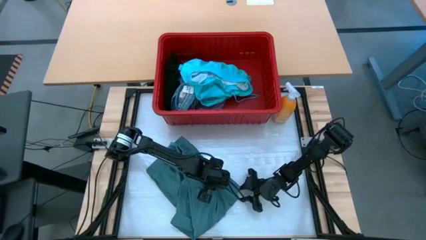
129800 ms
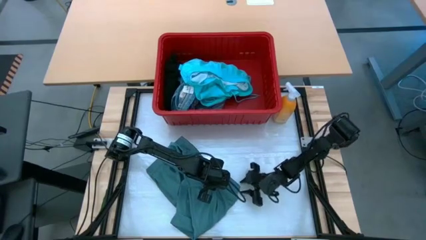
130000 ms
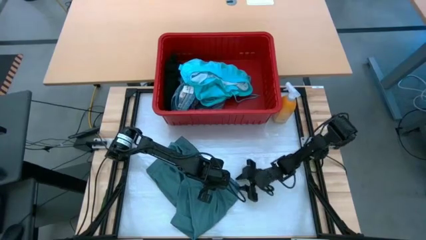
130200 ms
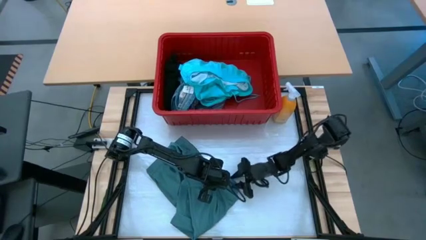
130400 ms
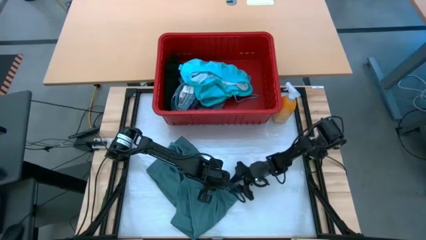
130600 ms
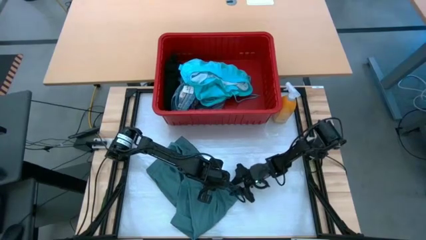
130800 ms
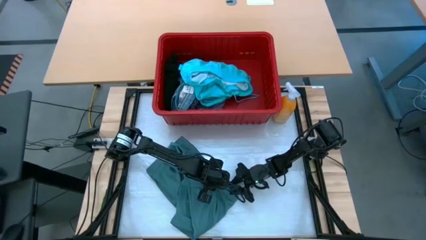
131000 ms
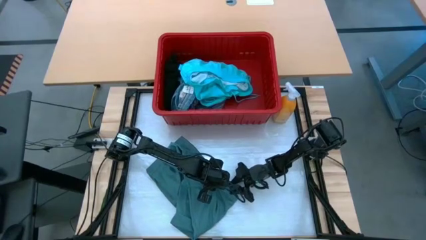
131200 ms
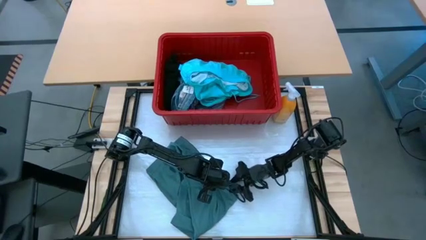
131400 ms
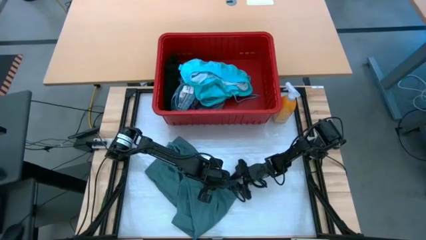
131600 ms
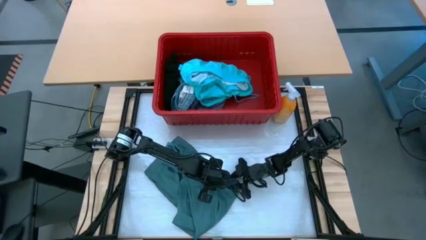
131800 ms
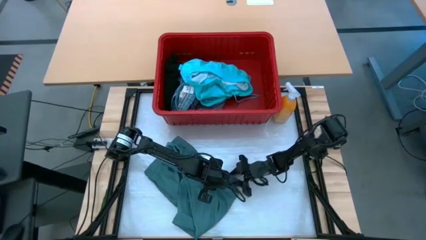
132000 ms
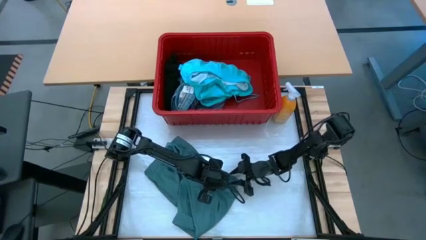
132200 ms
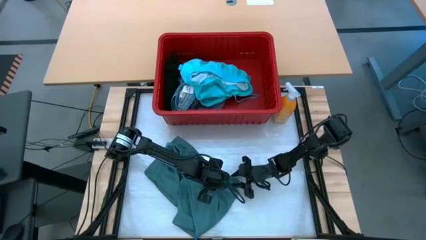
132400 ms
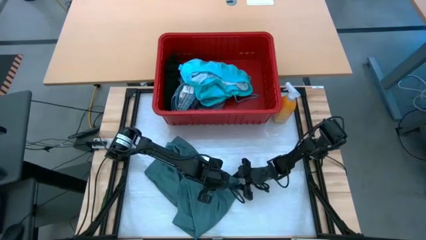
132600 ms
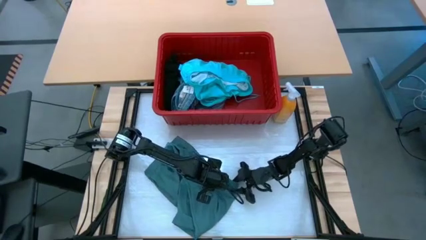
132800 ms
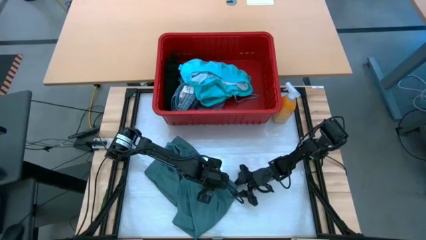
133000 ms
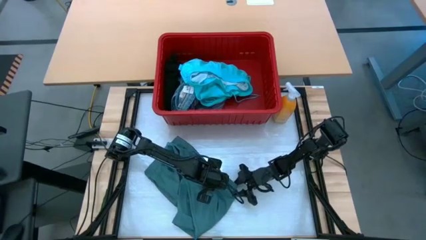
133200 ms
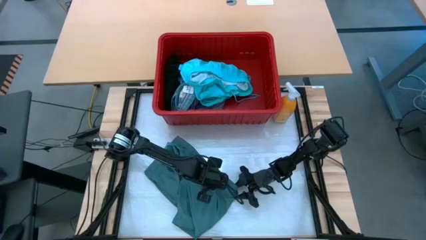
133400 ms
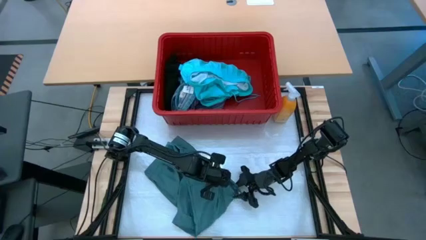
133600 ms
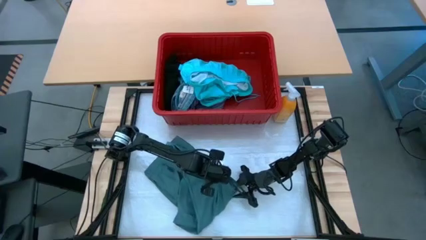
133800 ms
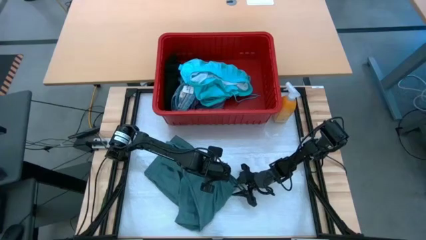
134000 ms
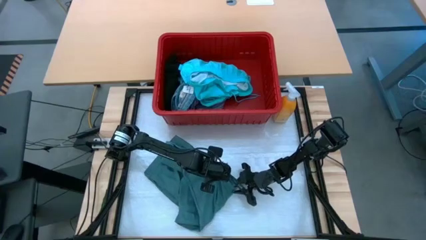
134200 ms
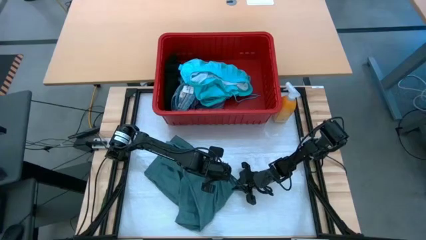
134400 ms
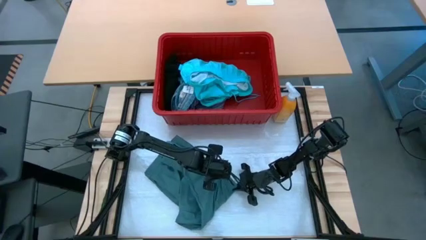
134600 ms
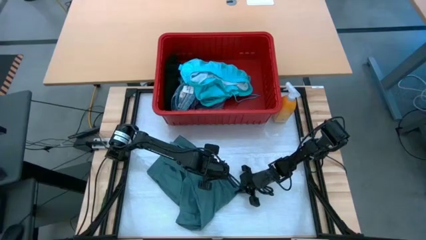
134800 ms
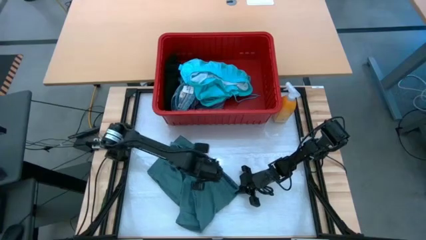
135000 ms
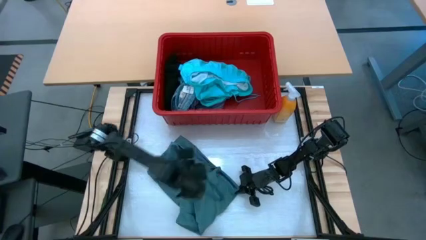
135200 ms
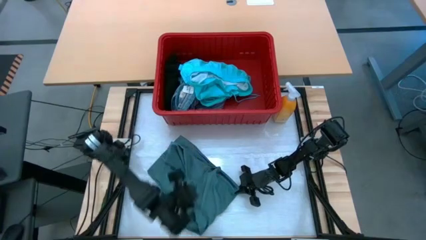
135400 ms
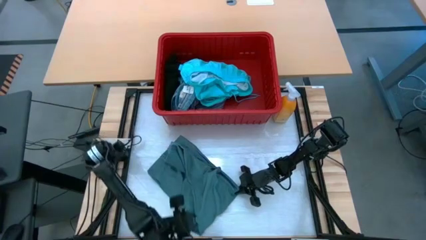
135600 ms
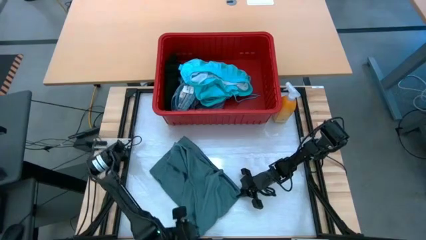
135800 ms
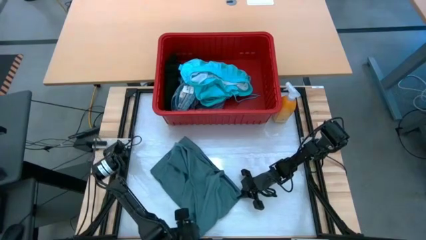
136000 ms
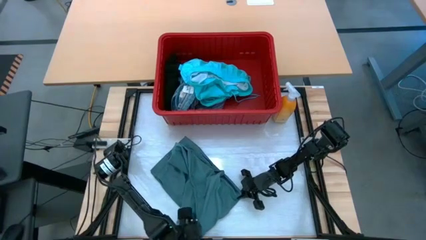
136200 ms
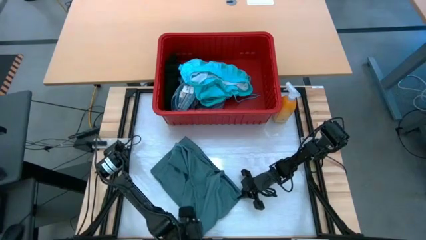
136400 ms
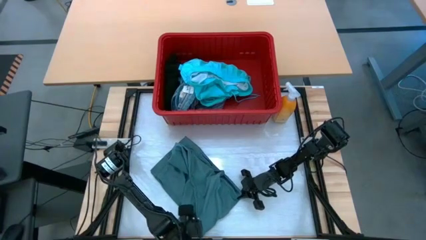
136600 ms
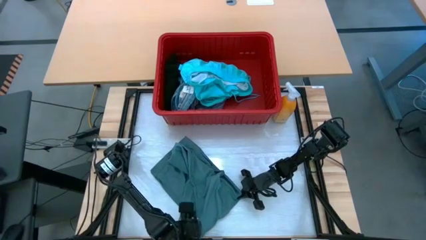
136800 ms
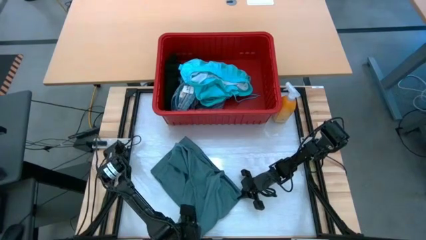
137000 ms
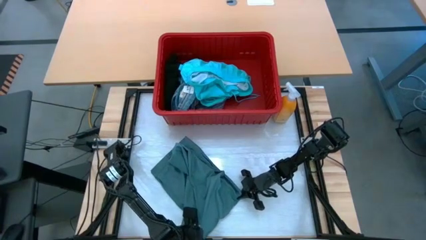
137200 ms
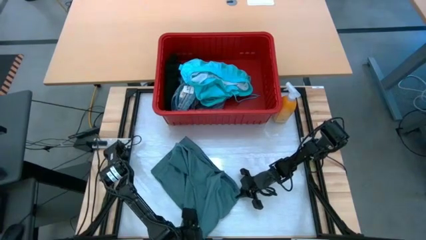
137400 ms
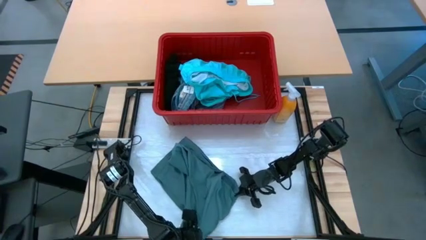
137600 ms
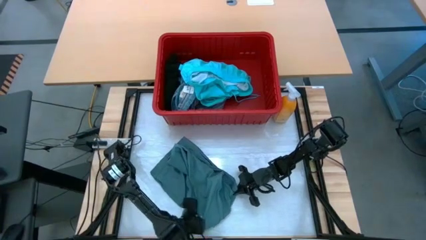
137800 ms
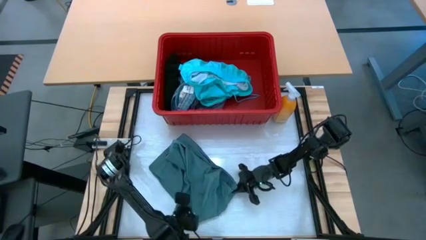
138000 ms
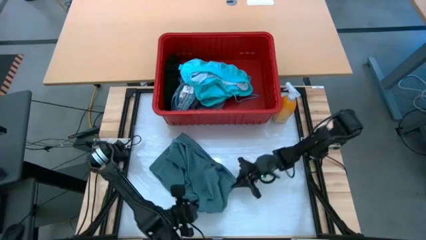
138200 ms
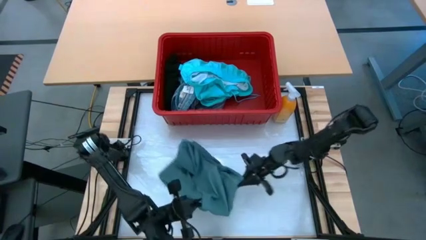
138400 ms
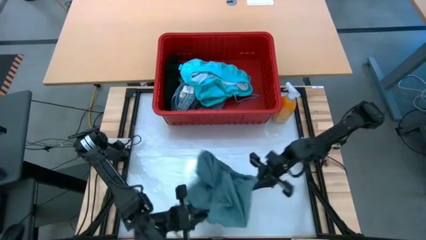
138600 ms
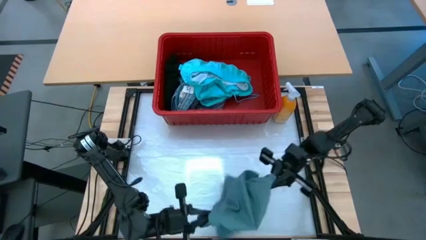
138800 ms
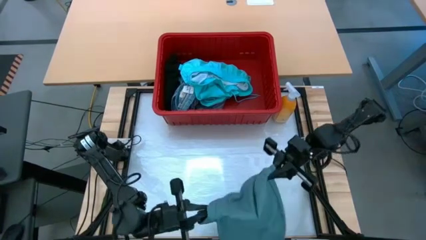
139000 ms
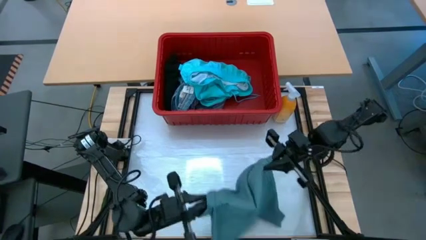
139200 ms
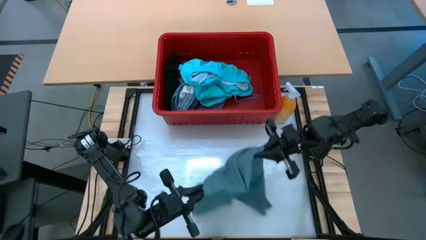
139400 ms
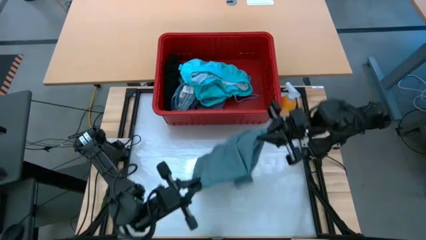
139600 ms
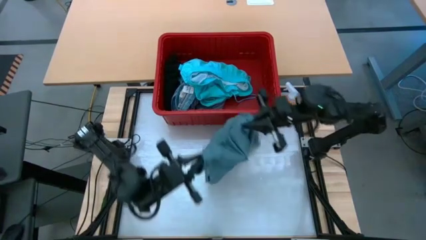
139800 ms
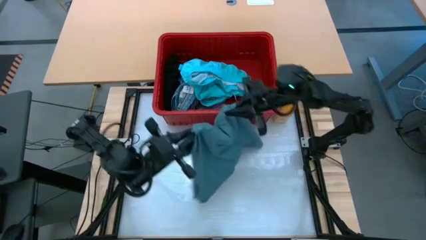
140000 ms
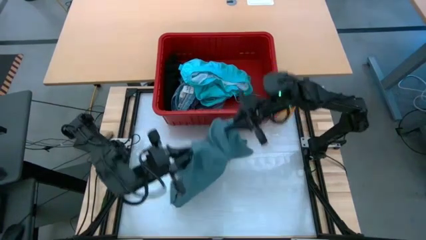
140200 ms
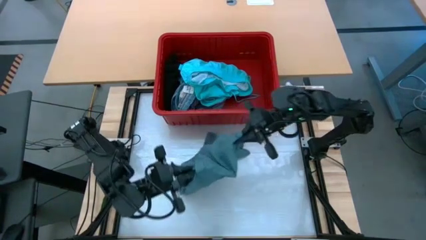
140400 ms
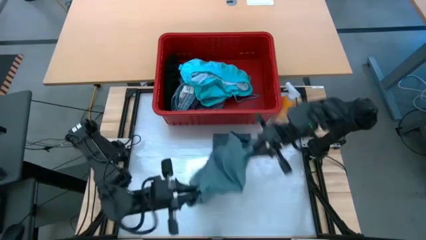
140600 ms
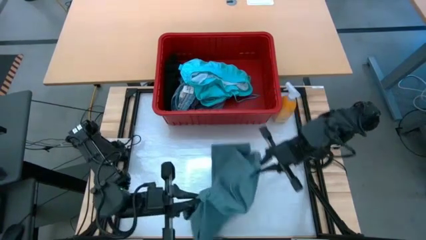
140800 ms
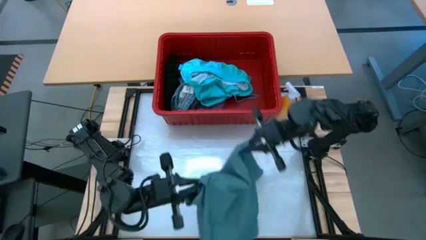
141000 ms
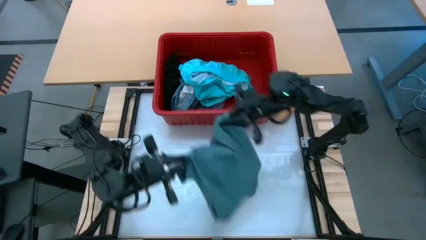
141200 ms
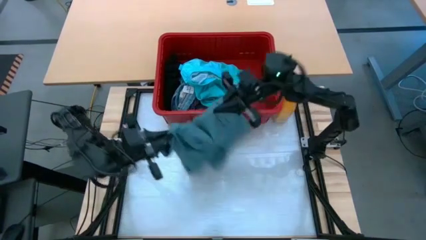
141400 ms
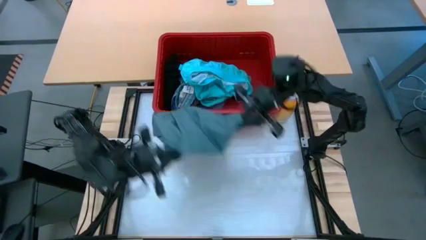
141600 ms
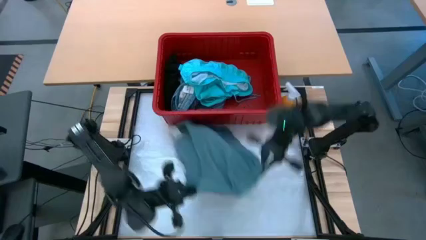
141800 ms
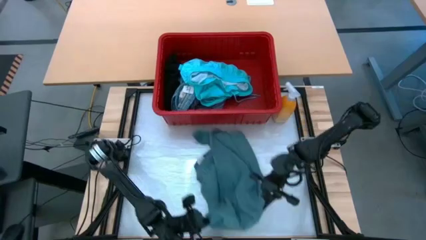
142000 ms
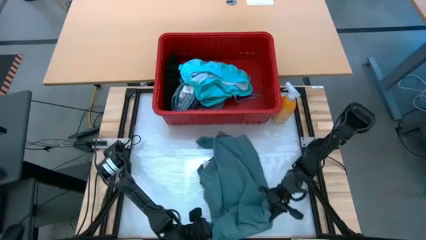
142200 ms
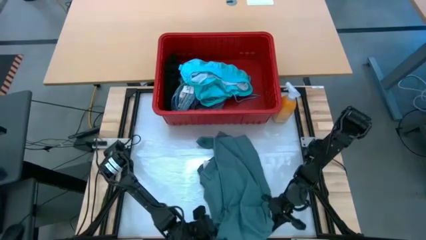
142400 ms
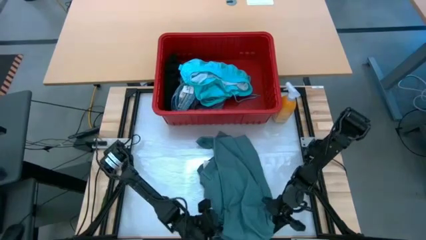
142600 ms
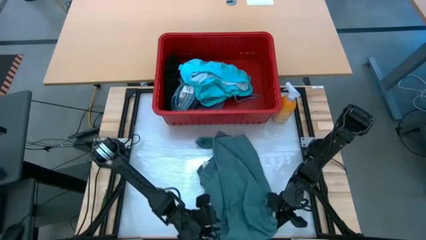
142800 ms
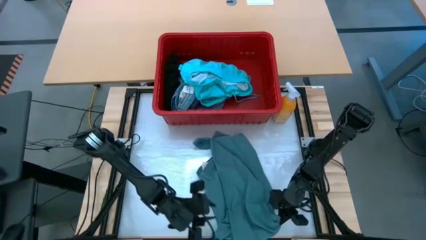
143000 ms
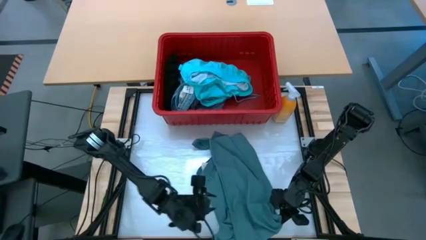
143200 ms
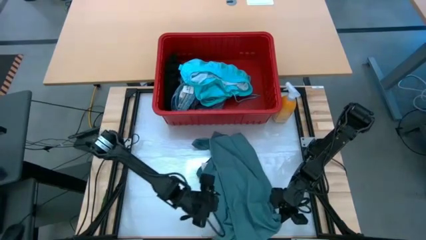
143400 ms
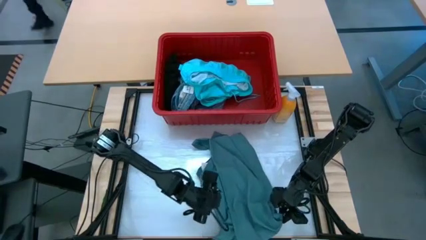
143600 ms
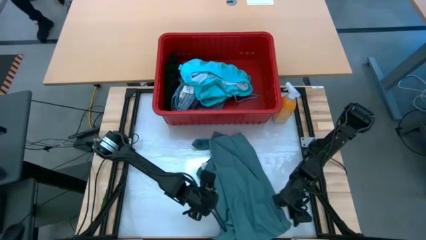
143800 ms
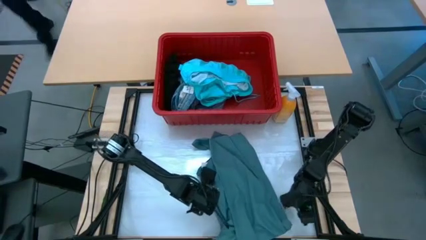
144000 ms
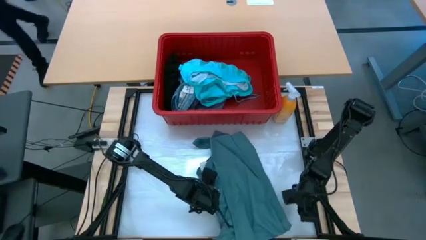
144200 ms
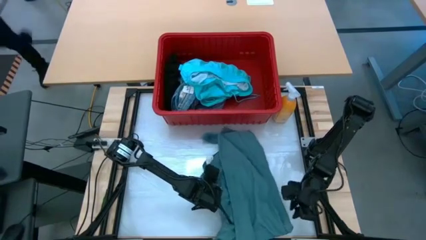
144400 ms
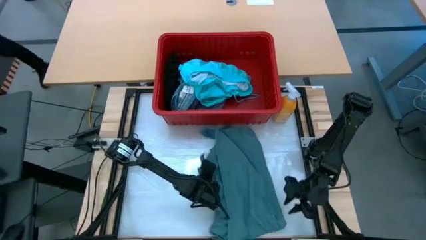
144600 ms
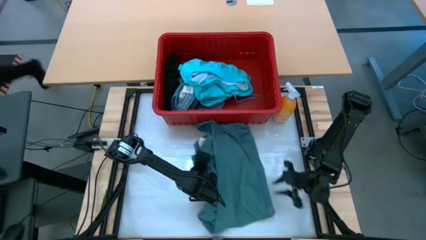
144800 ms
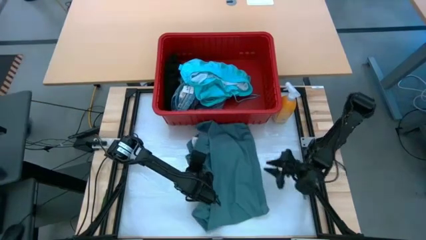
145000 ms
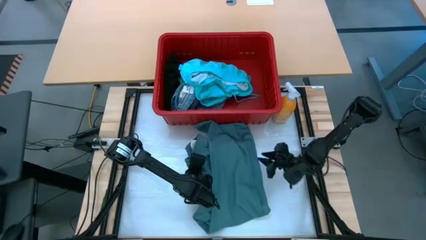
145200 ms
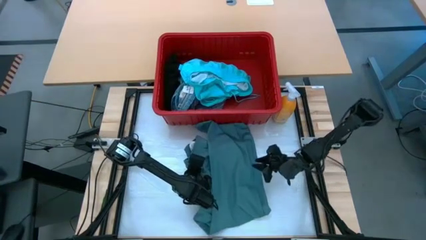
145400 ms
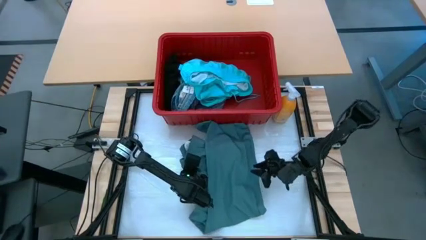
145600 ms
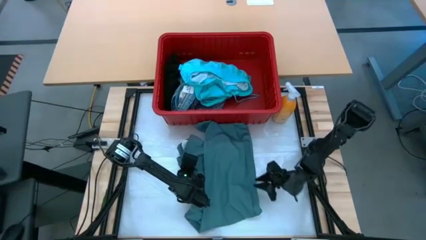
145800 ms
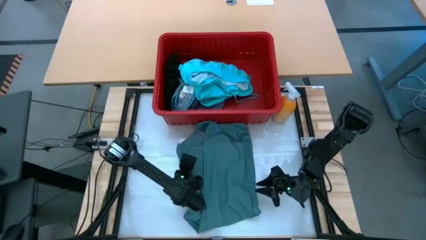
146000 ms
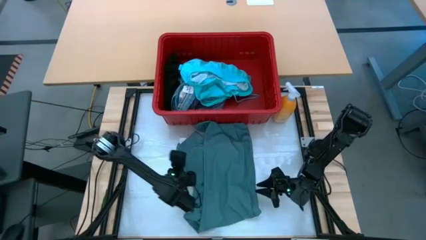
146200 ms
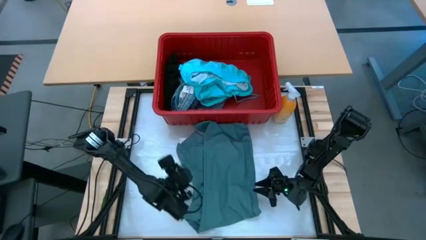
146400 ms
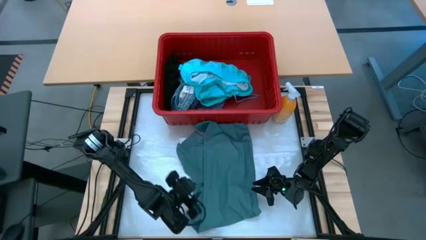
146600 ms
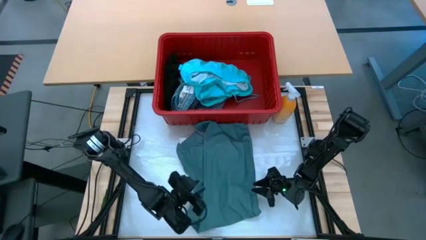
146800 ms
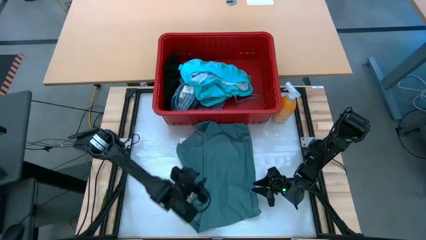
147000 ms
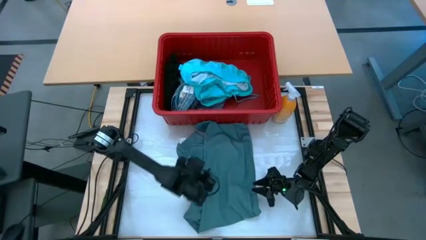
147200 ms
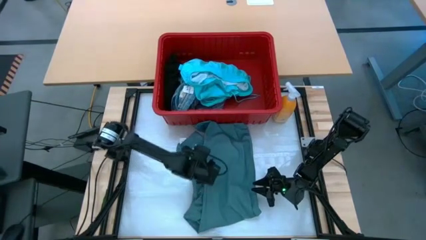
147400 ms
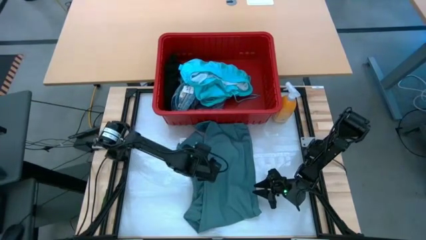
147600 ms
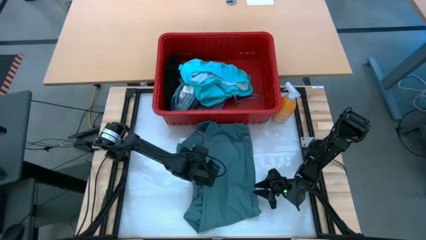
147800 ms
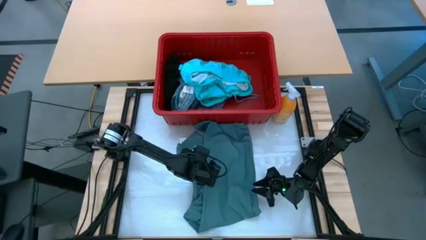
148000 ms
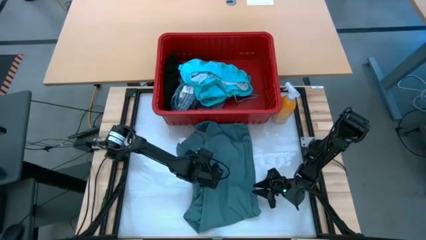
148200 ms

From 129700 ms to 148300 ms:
Task: Fold Laundry from Bin
Fold the light blue pants
